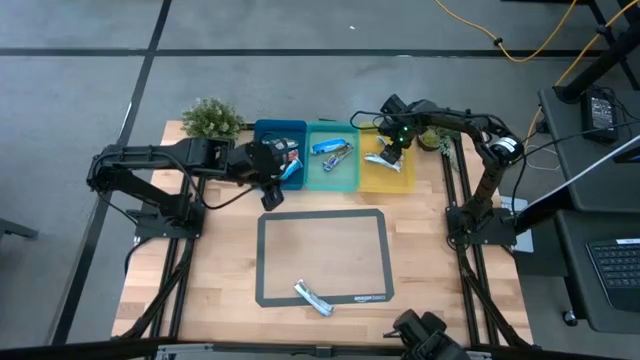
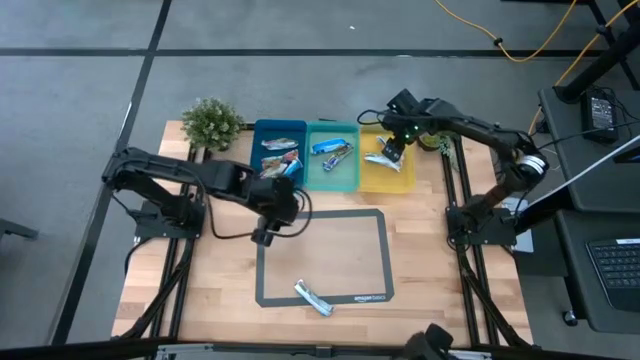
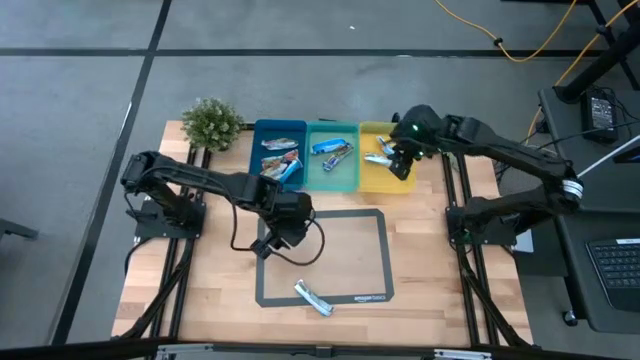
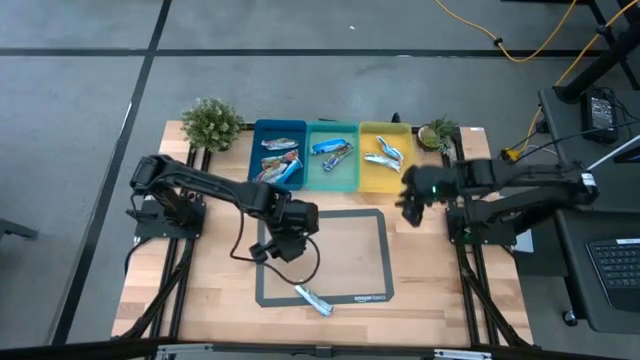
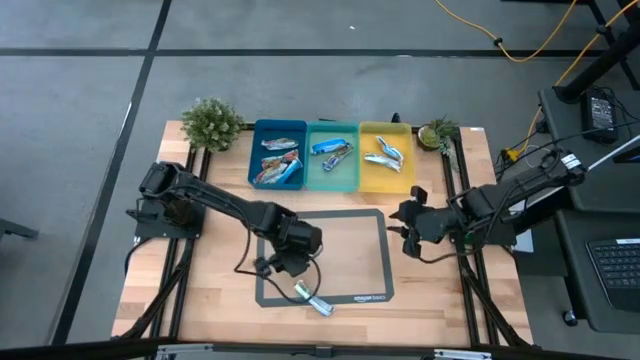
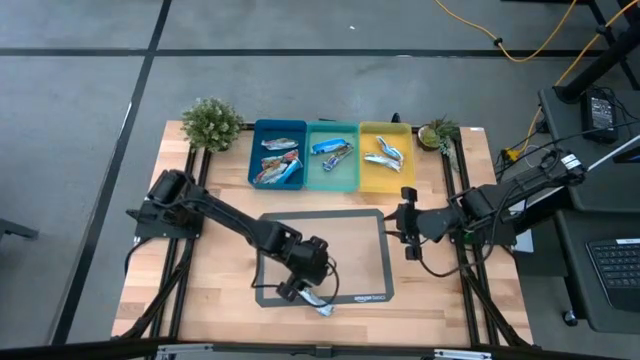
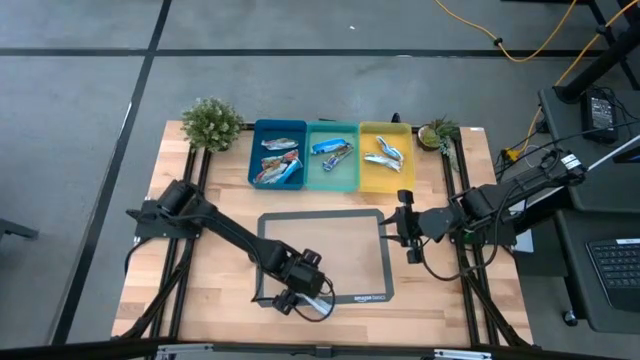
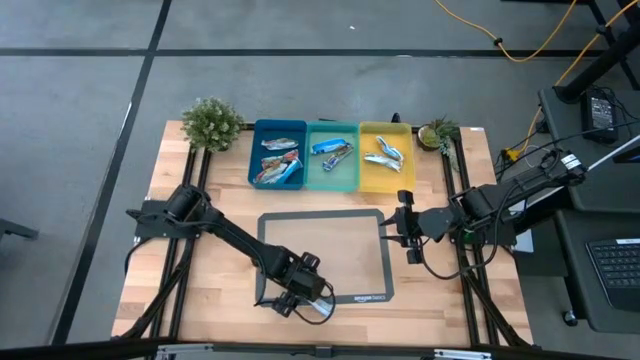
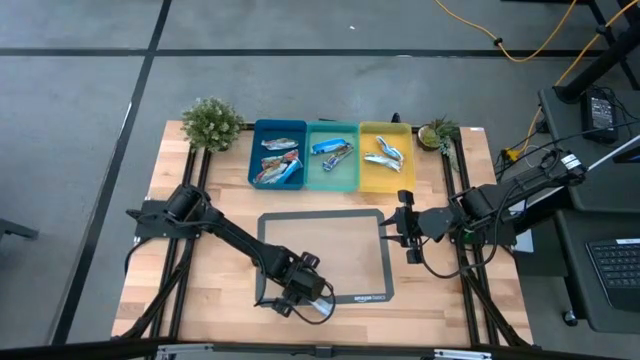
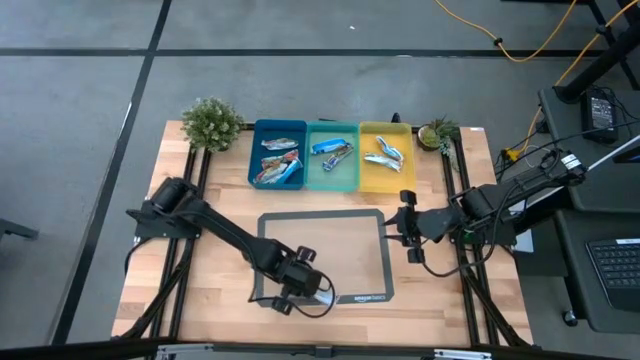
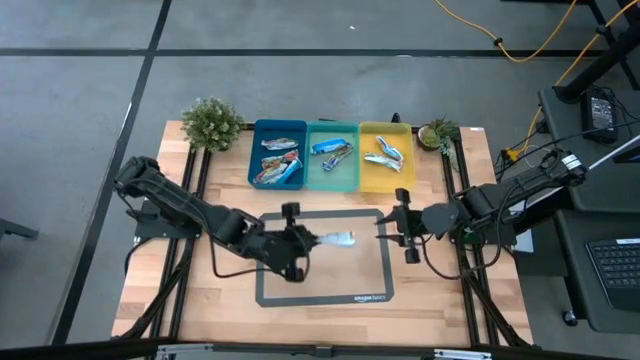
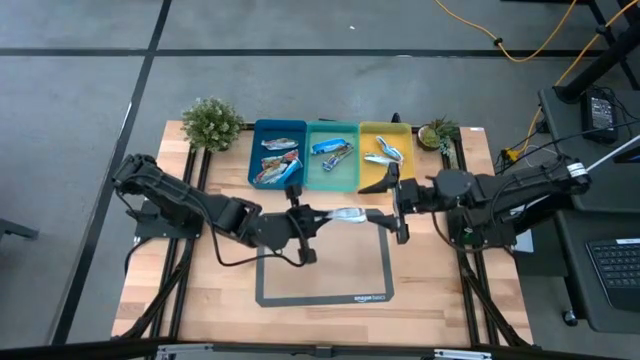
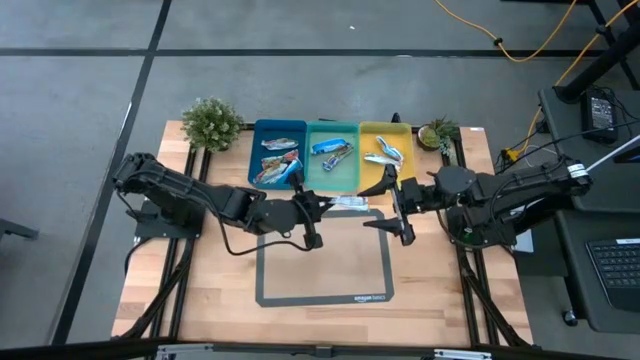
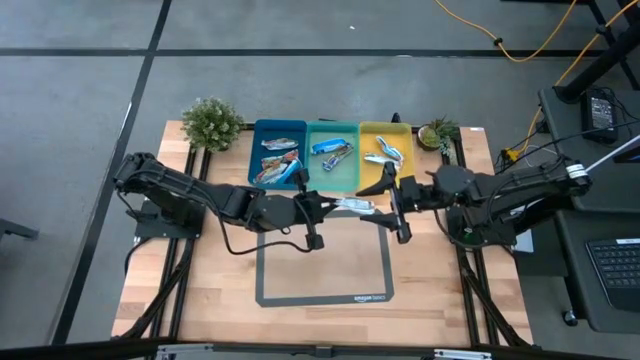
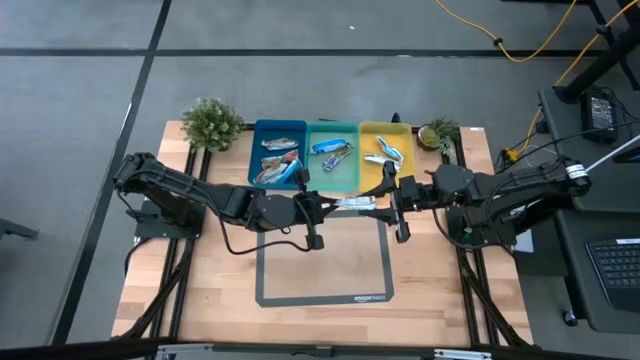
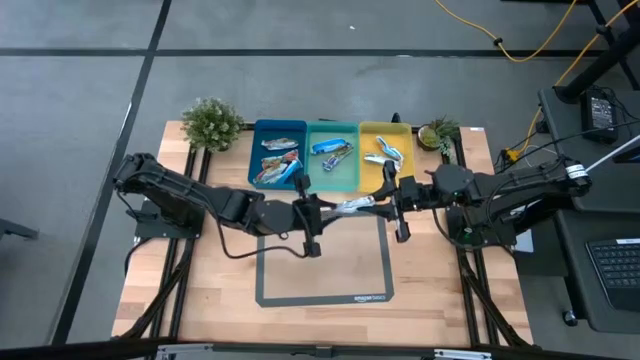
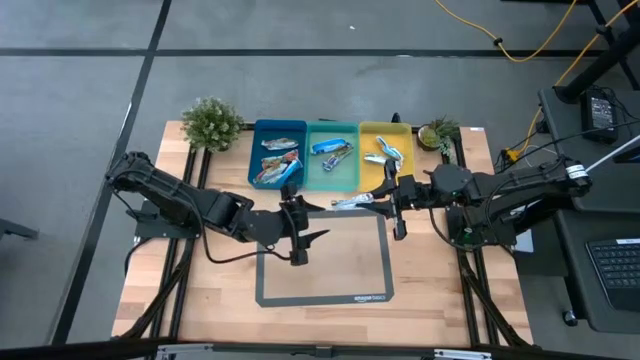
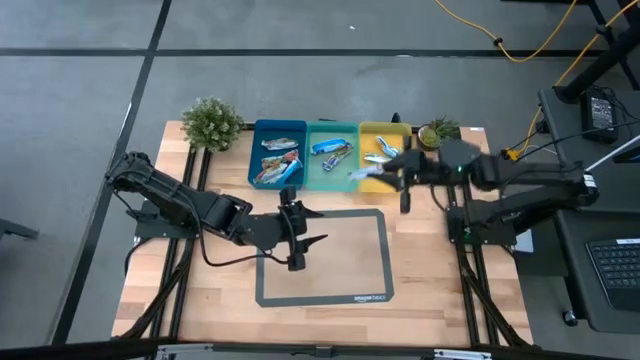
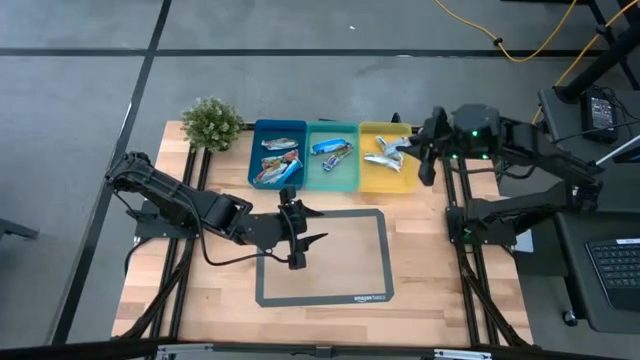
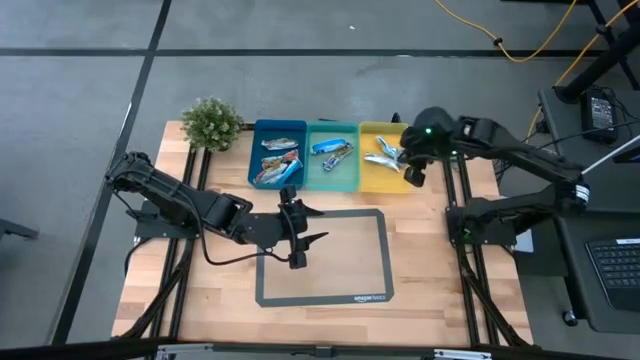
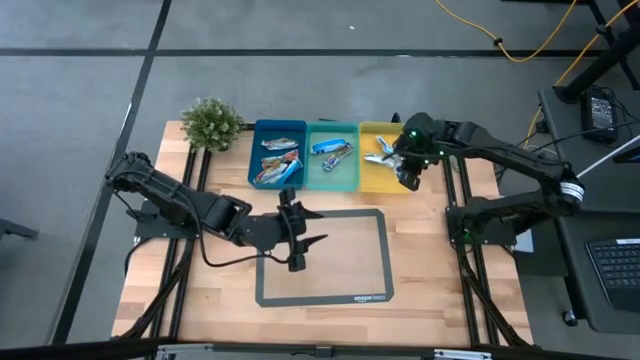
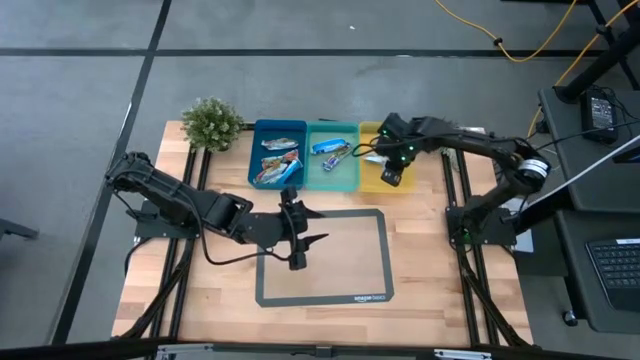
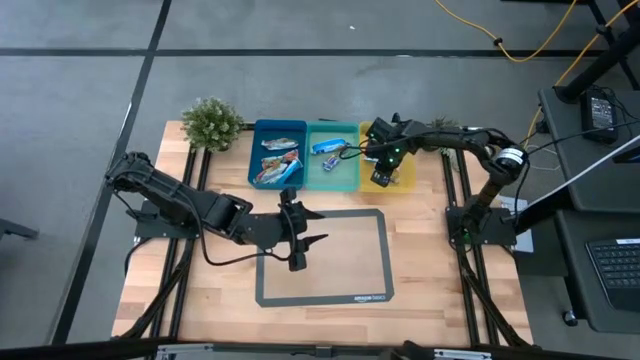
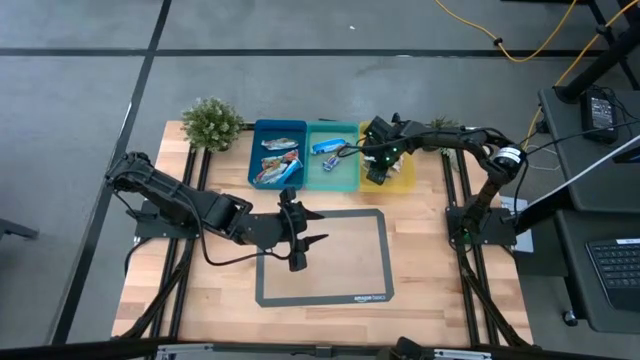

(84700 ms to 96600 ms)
Task: Pick and place Granola Bars by type
Put the yellow granola bar into the yellow bin

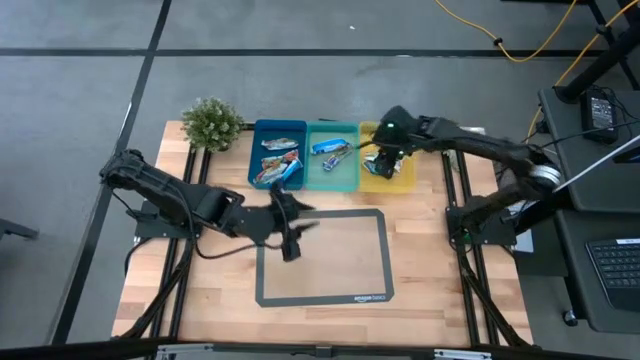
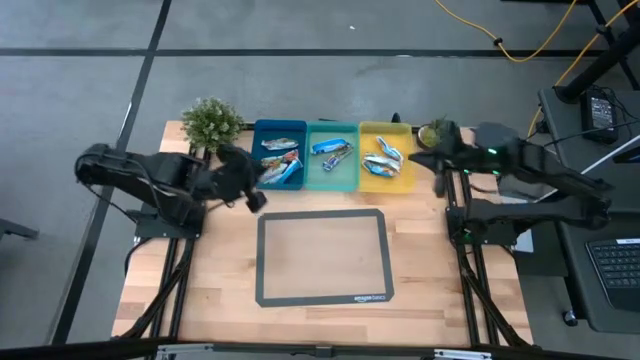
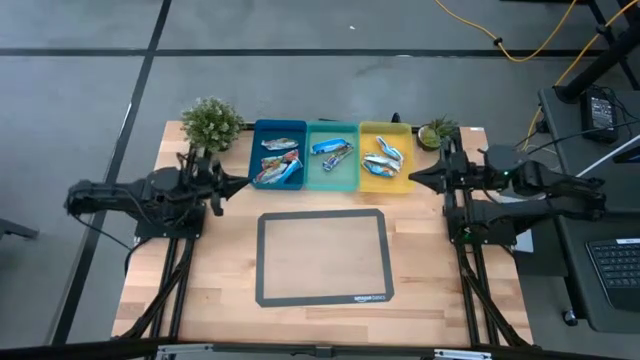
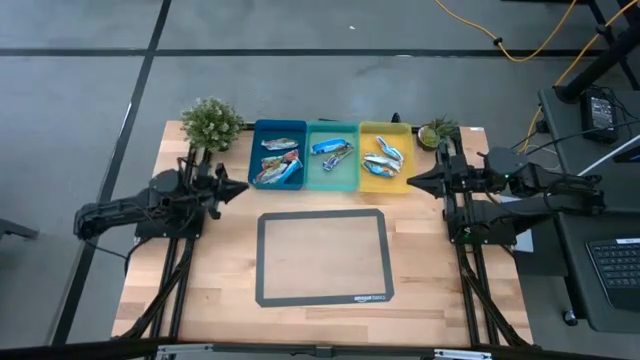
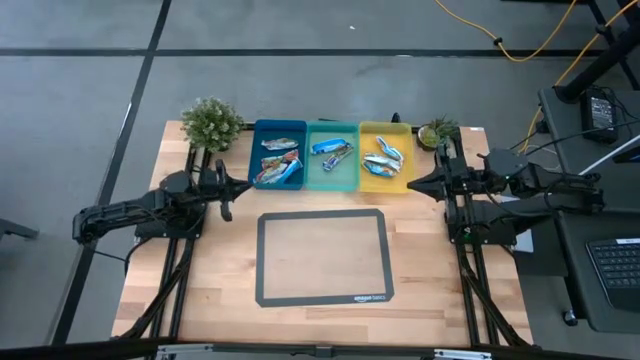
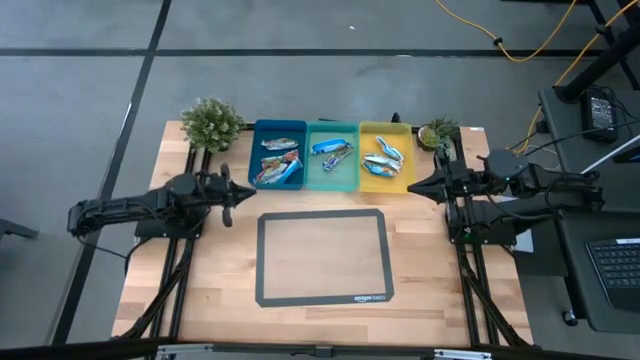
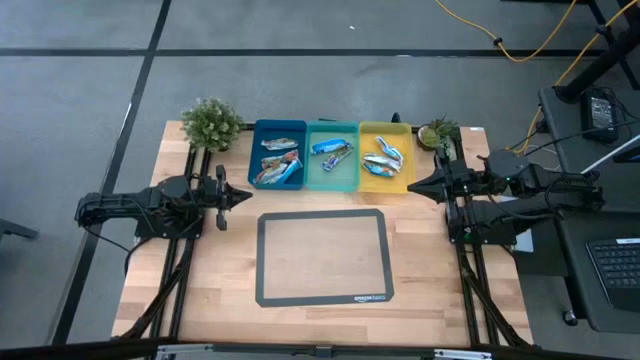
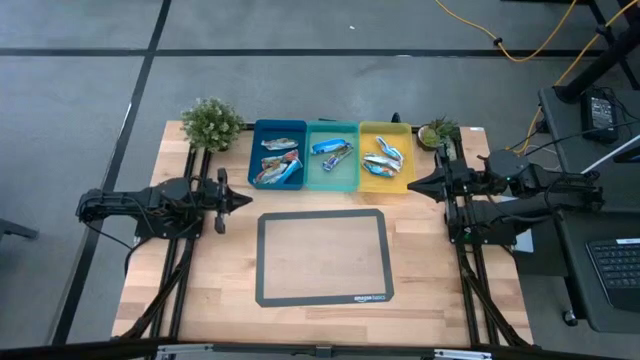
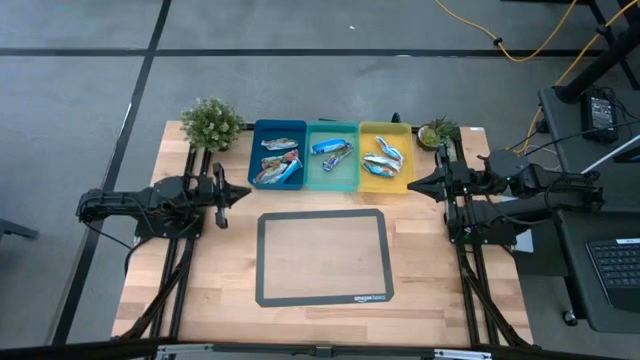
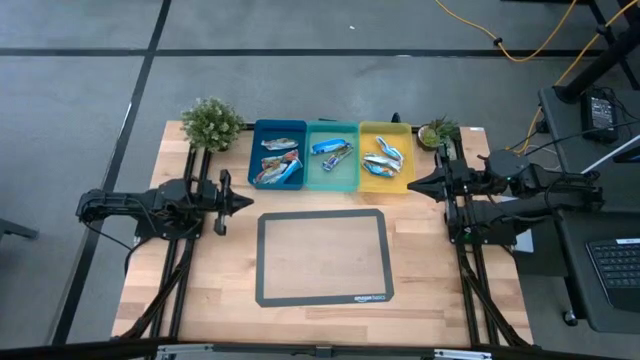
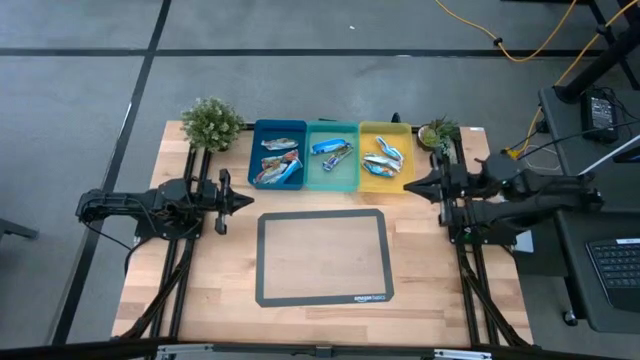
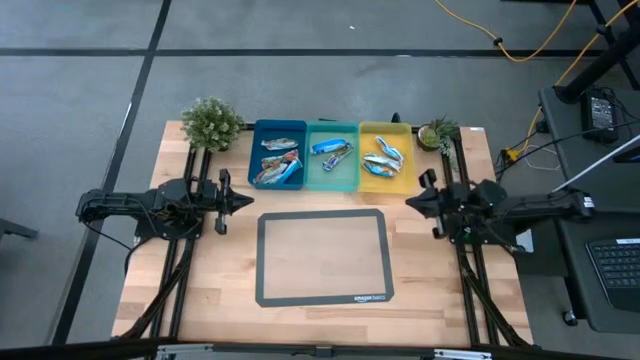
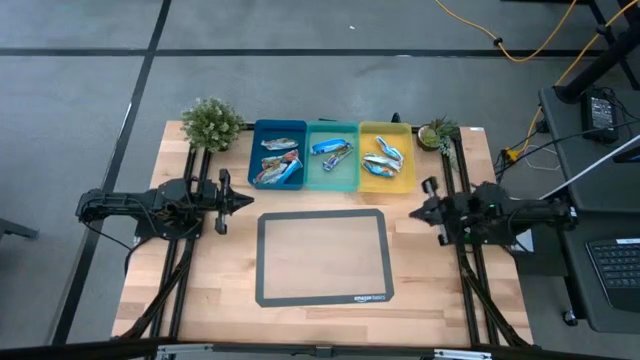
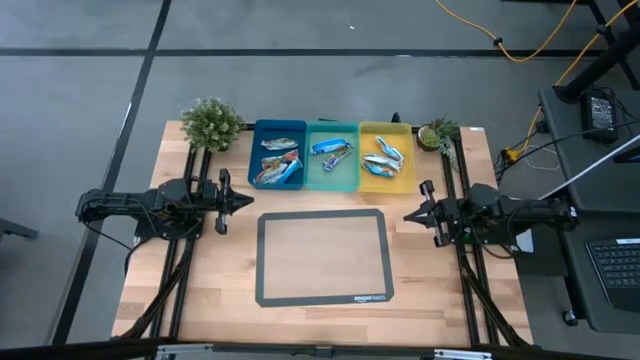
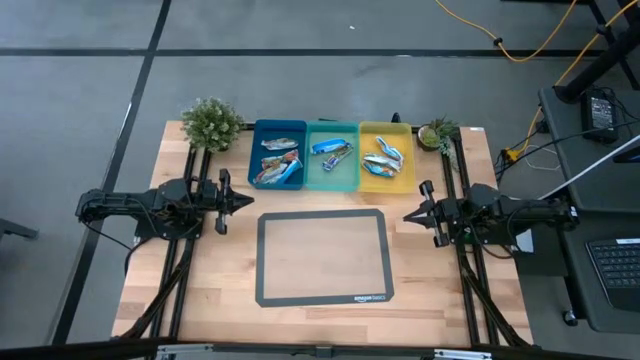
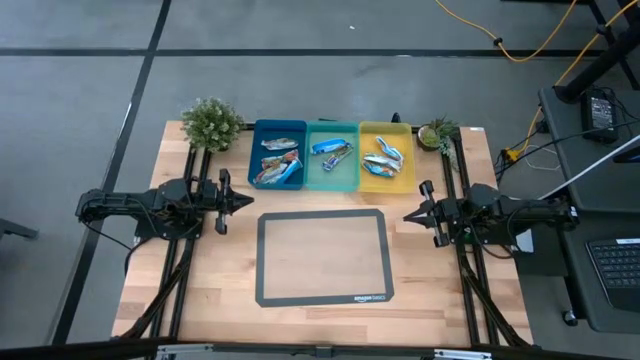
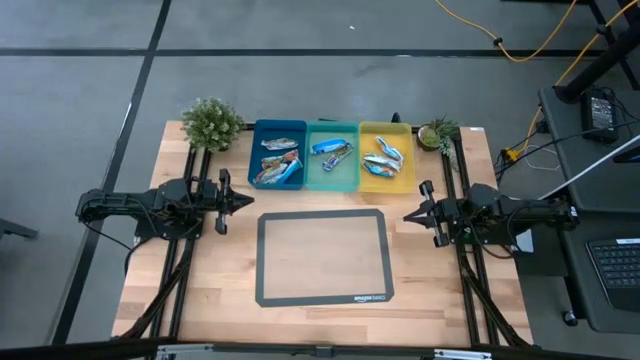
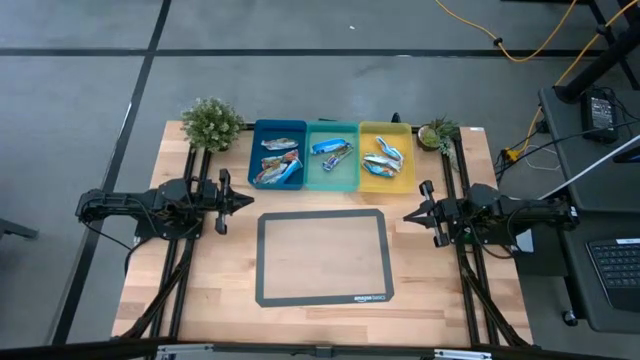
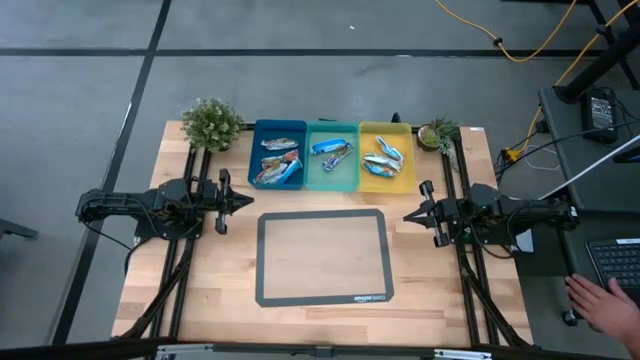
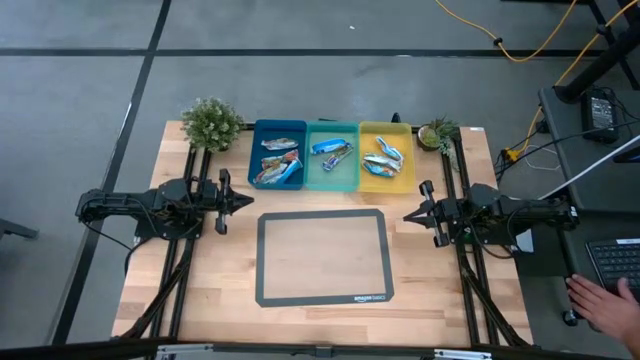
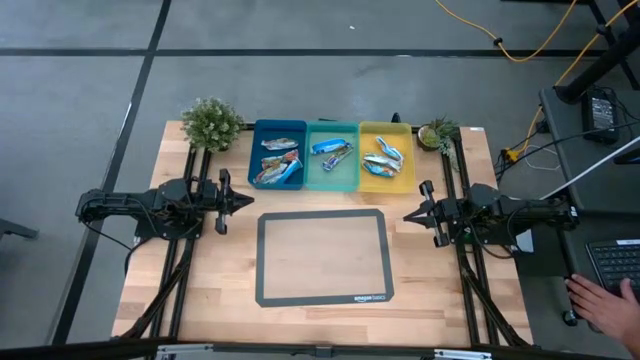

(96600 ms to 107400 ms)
Return to Home Position
